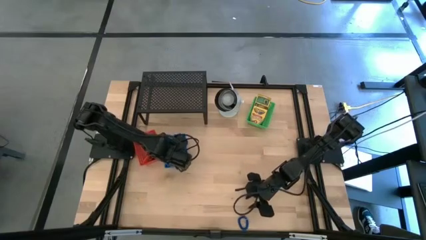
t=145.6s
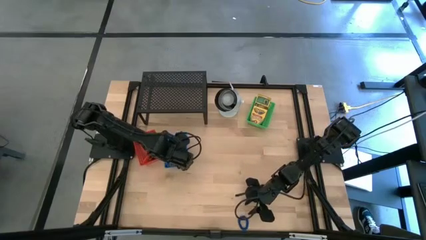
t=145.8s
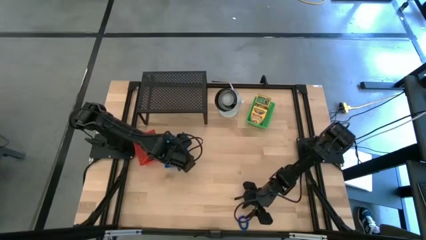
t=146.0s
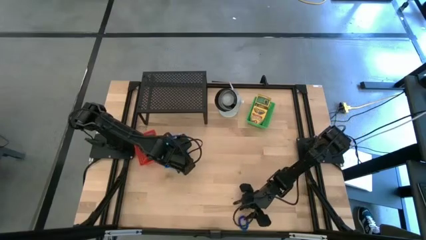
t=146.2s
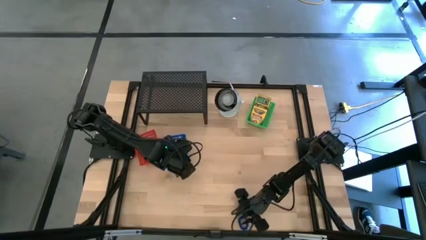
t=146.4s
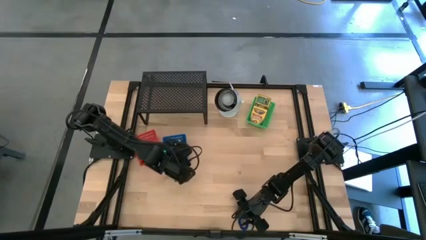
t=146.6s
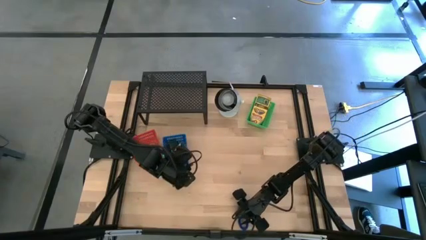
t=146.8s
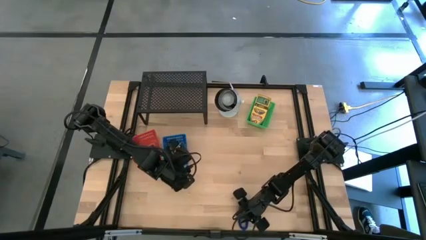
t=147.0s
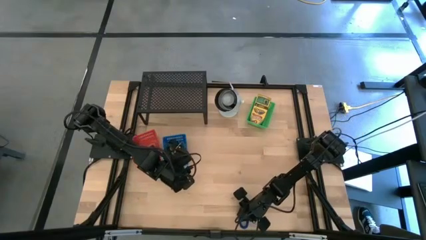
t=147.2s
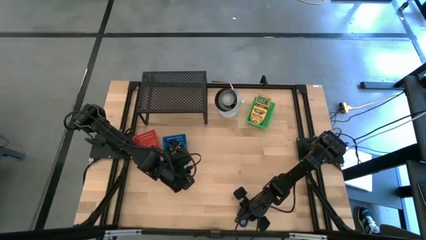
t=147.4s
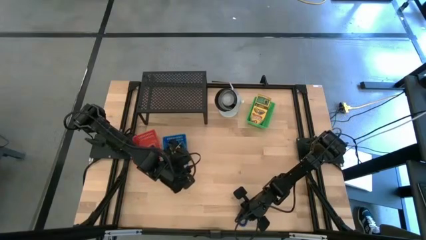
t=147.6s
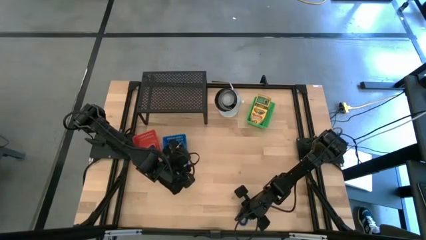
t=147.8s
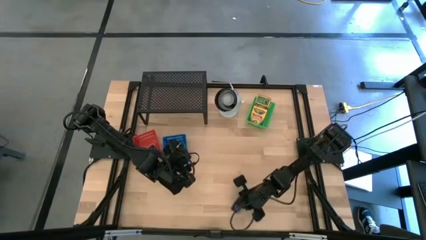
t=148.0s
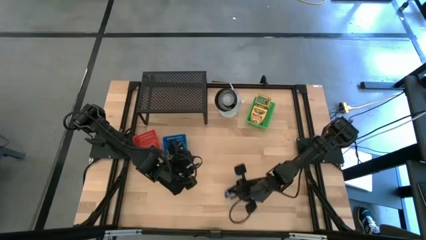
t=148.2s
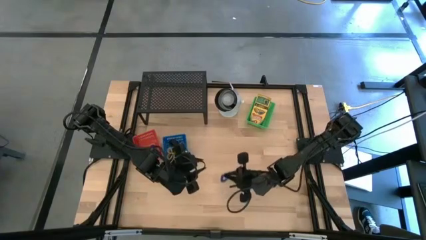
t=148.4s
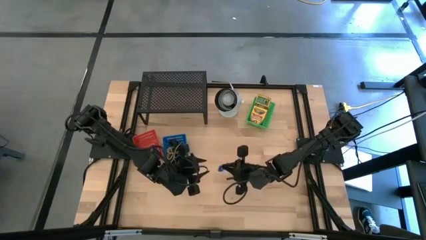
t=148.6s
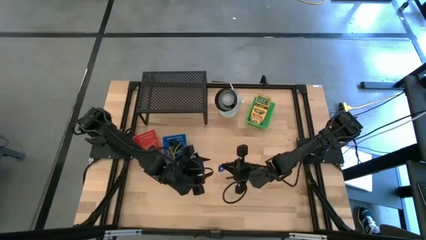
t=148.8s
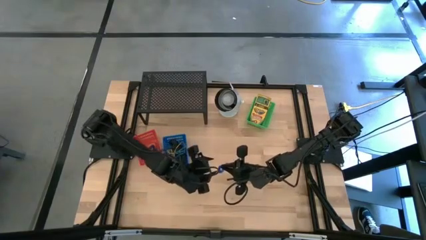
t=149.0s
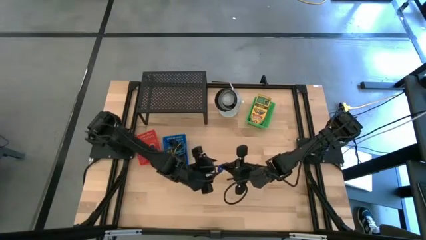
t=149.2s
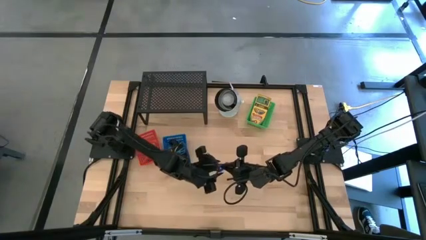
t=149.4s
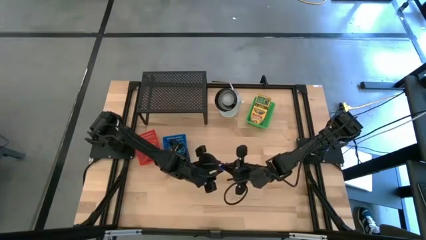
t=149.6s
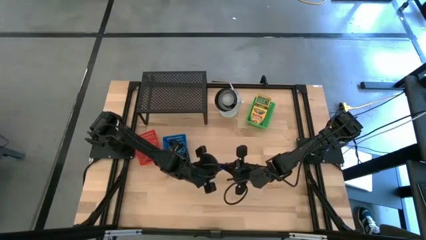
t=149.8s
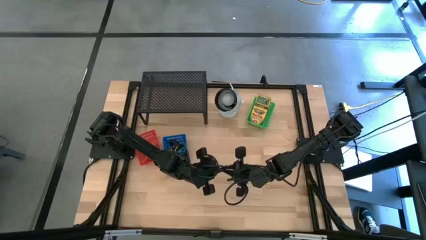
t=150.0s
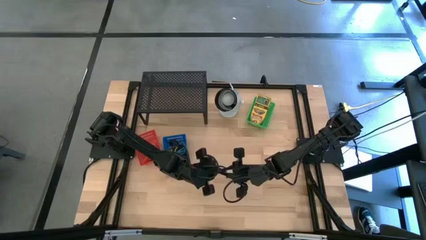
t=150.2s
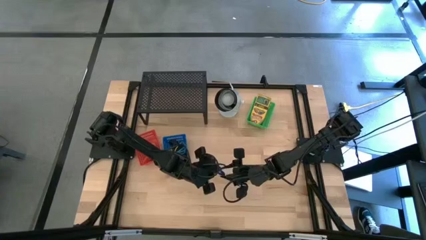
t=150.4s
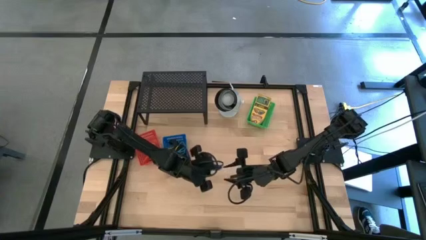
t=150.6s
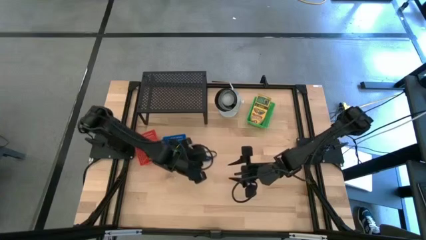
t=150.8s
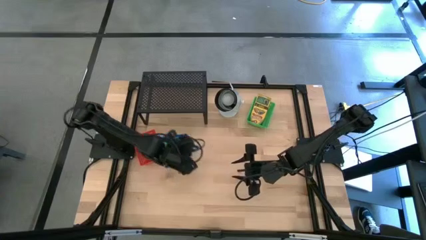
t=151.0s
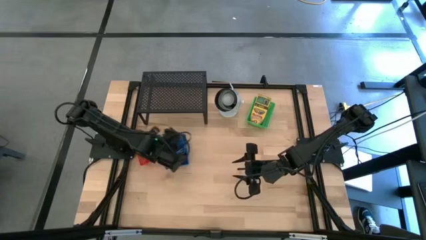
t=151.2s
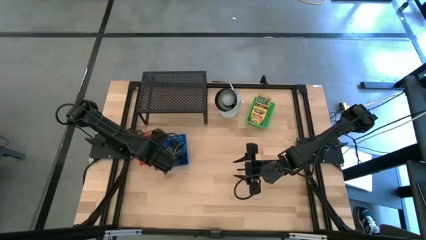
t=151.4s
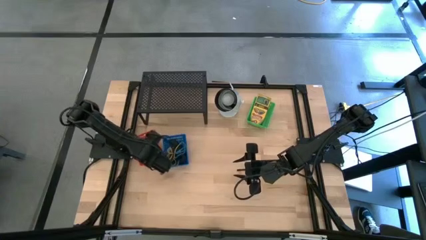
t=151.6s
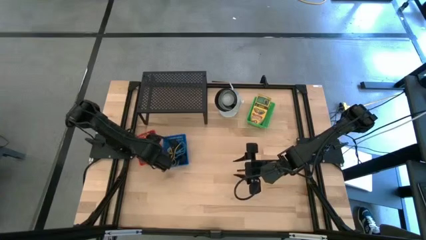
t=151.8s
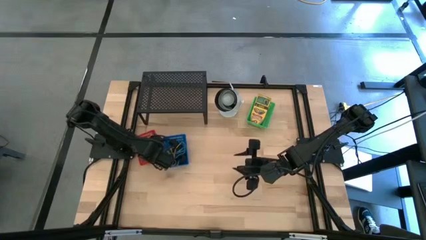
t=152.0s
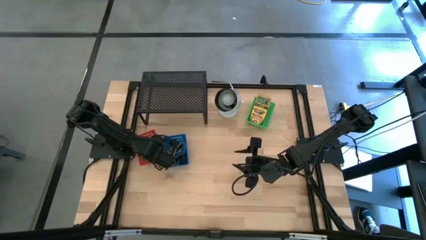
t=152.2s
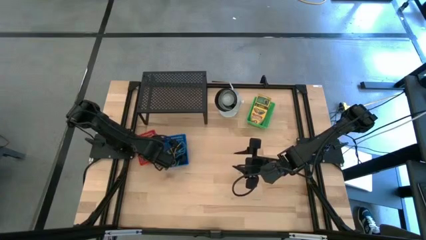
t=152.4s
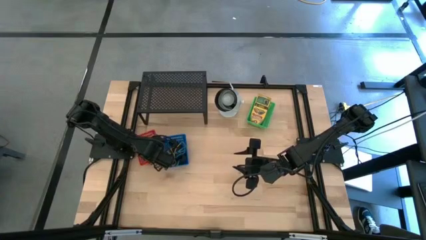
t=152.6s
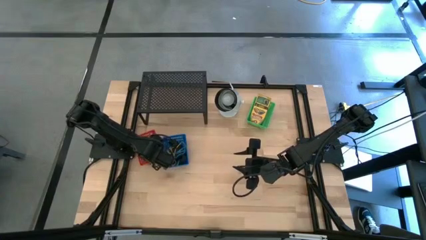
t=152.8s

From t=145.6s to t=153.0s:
Task: Pick & Place Office Desk Supplies
Put the blue spring keychain into the red bin

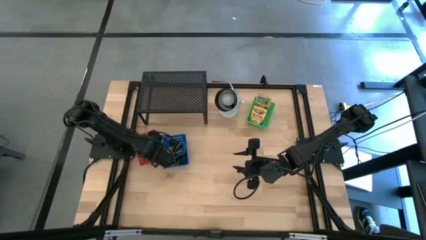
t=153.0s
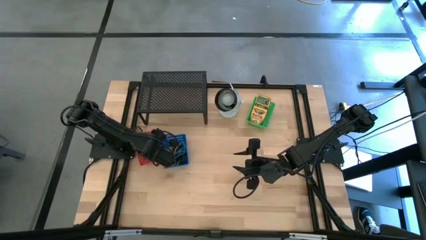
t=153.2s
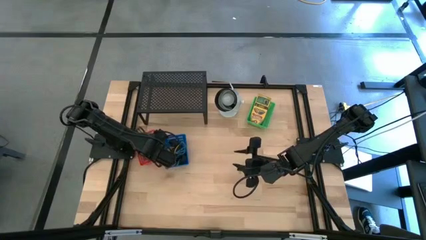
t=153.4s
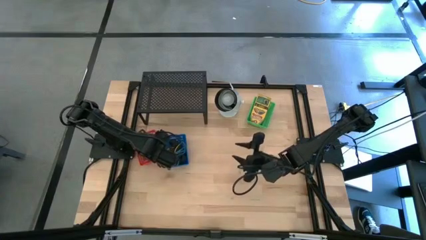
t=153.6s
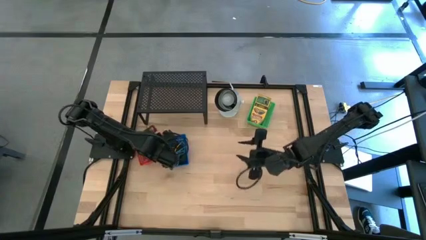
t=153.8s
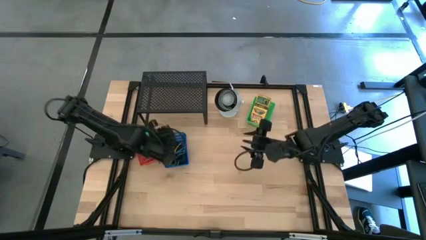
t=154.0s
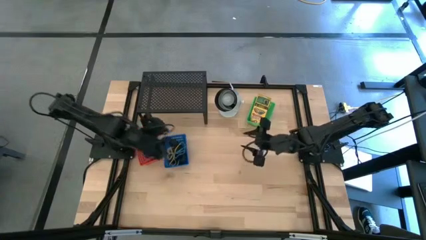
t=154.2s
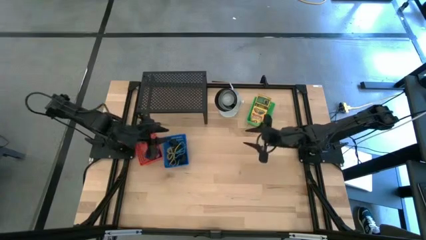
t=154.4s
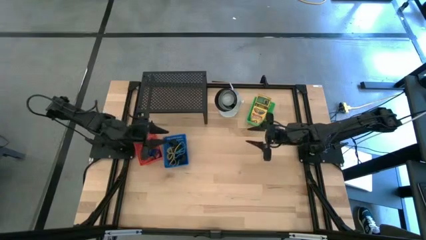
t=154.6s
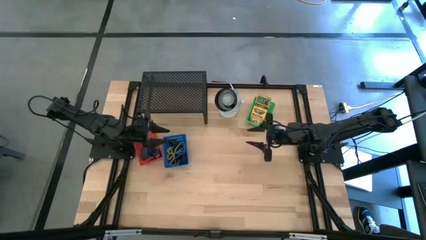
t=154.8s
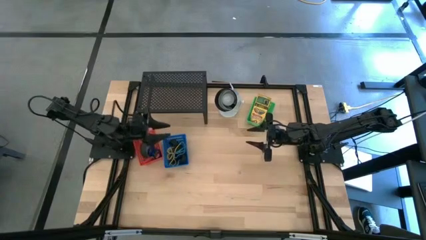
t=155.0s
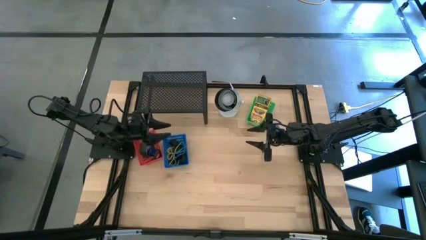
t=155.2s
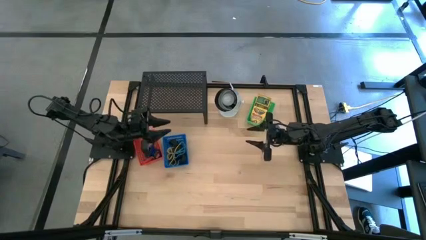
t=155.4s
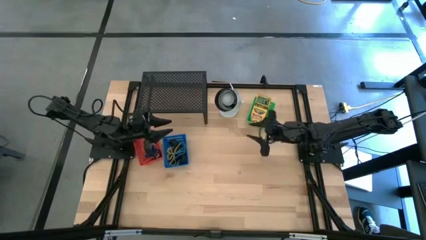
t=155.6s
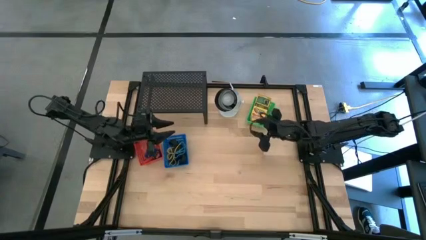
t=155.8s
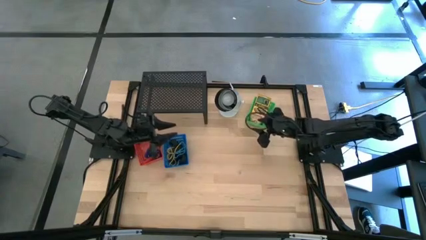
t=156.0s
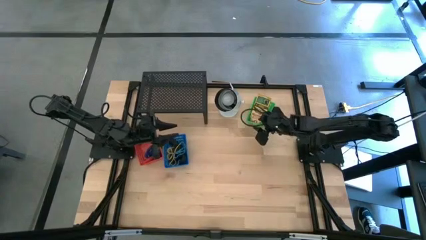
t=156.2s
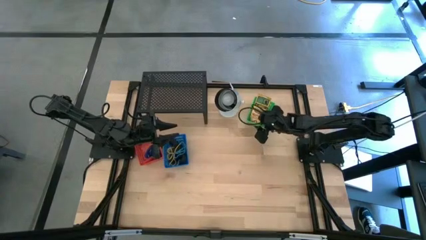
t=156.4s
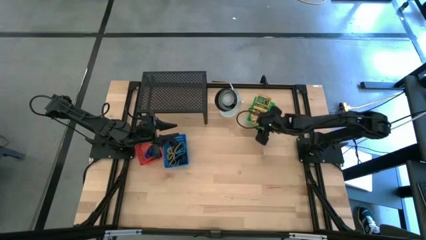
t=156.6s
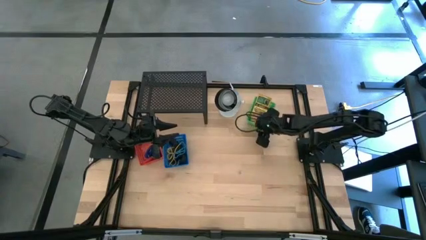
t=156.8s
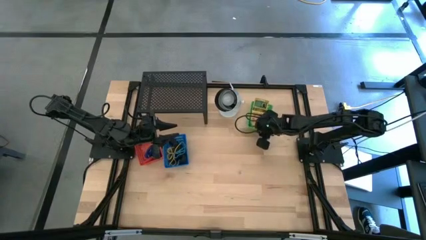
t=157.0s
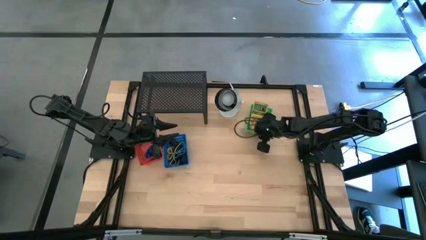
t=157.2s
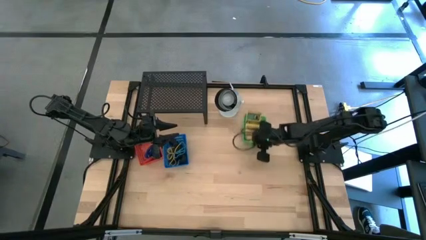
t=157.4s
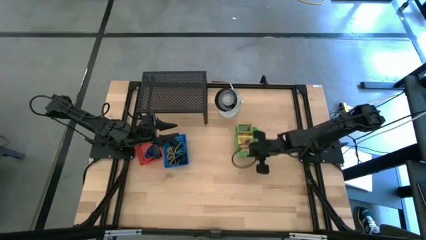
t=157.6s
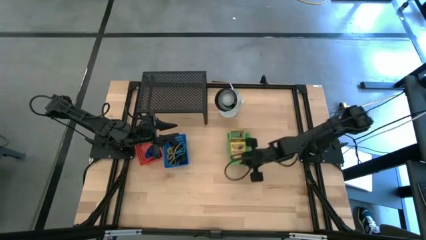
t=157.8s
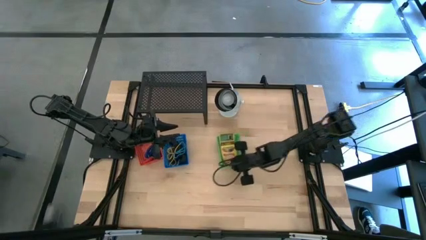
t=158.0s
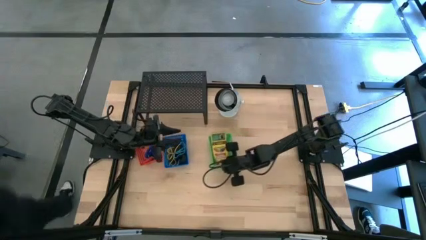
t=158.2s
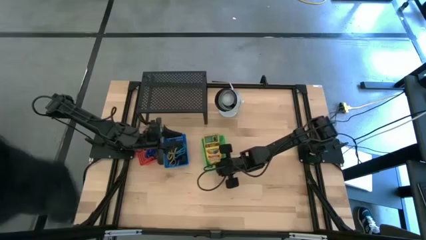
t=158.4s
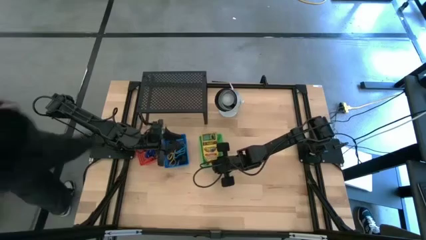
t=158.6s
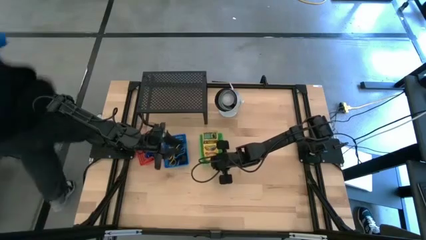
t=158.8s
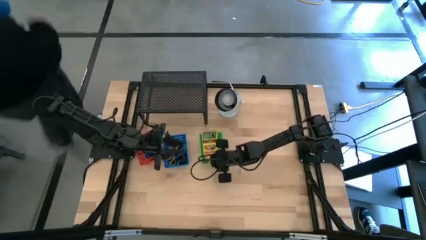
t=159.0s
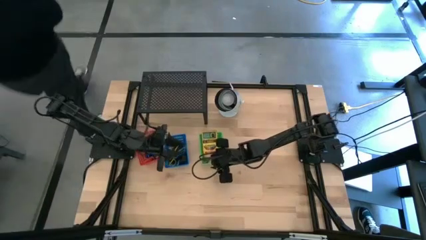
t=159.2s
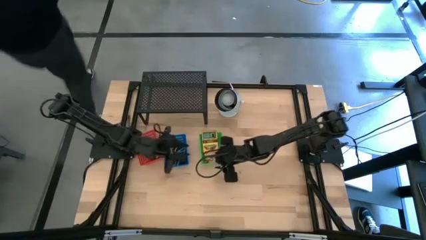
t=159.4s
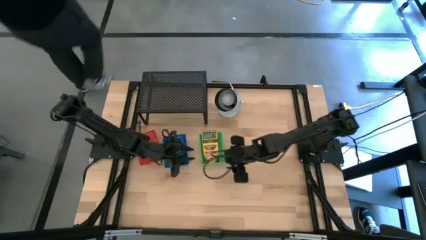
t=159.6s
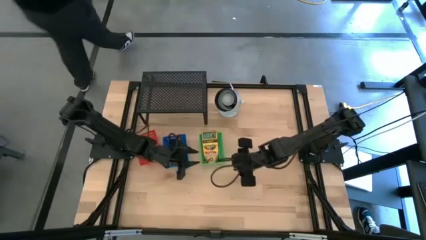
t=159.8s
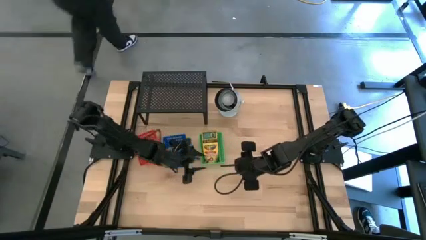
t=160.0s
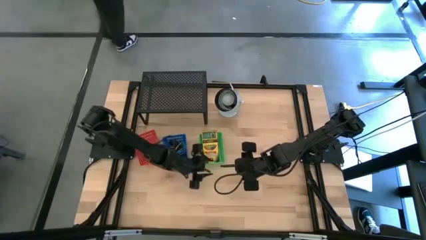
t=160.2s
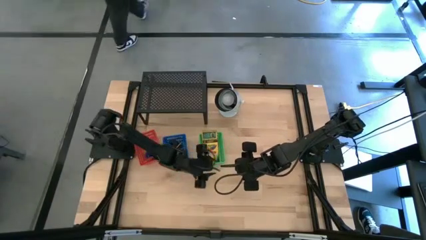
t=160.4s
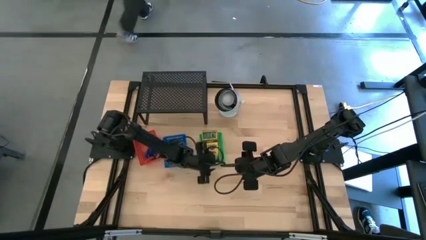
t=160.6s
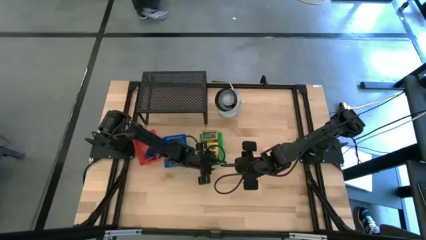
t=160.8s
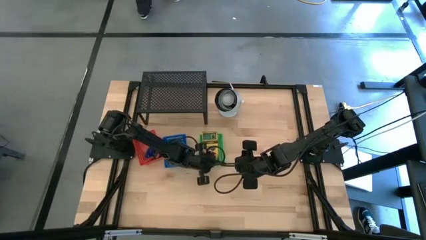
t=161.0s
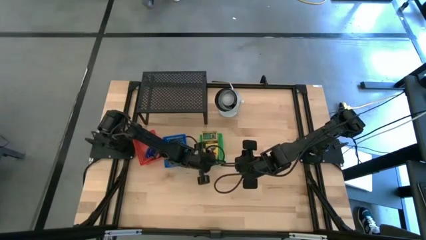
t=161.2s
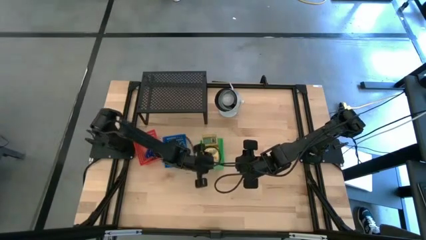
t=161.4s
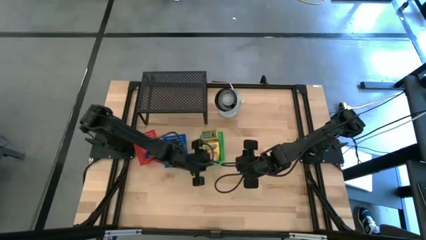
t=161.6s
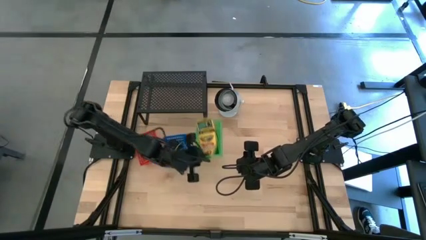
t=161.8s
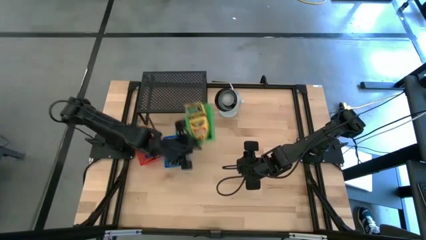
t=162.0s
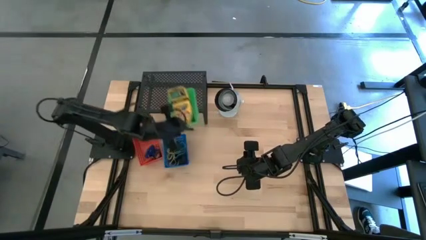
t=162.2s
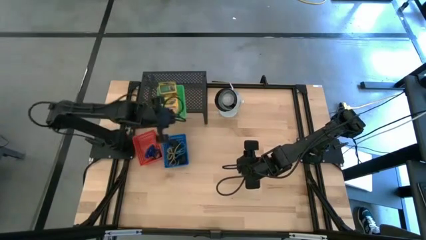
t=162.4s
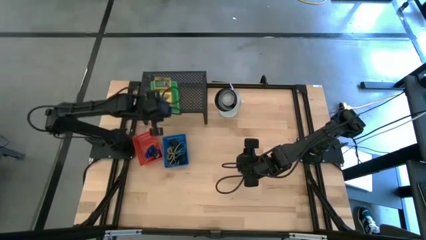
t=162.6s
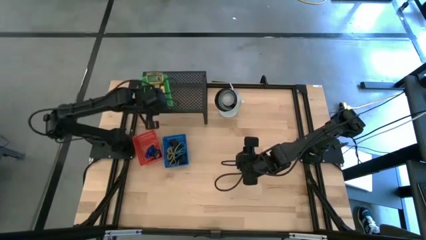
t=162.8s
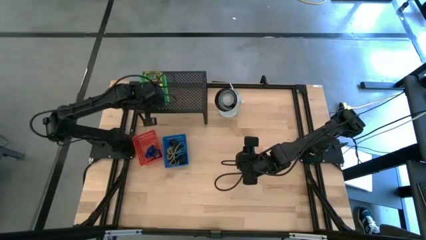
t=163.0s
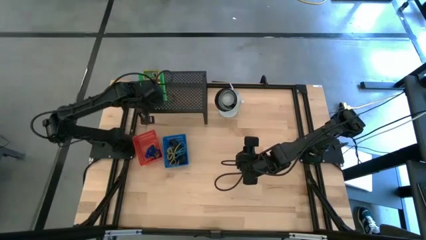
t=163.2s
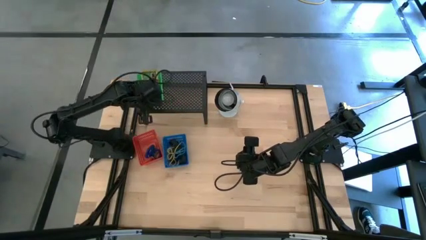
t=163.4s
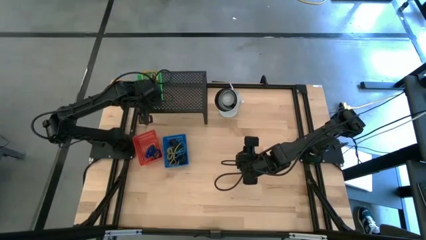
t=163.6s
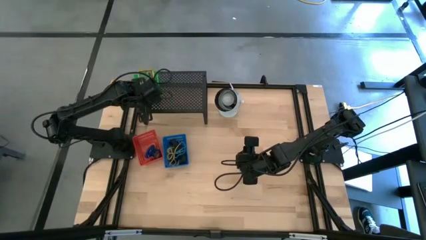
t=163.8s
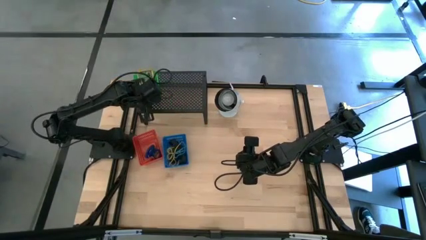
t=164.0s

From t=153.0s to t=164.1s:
Put the green bin with crayon boxes on the shelf
